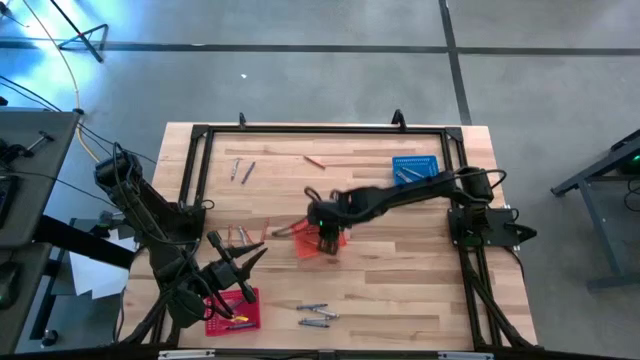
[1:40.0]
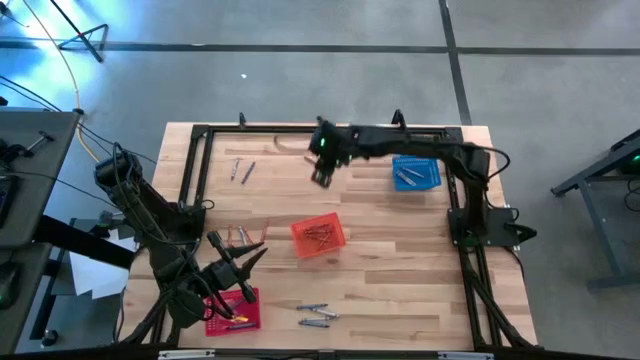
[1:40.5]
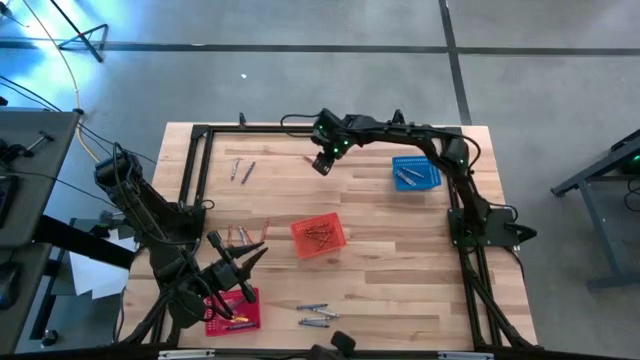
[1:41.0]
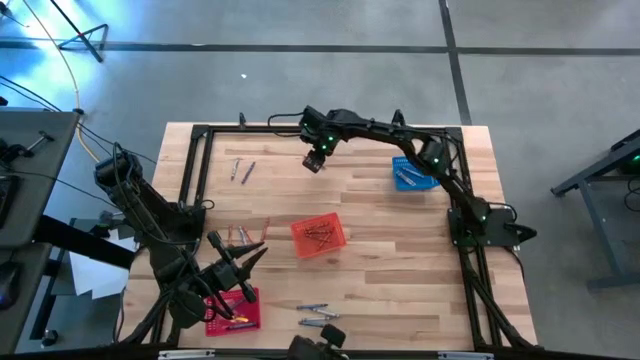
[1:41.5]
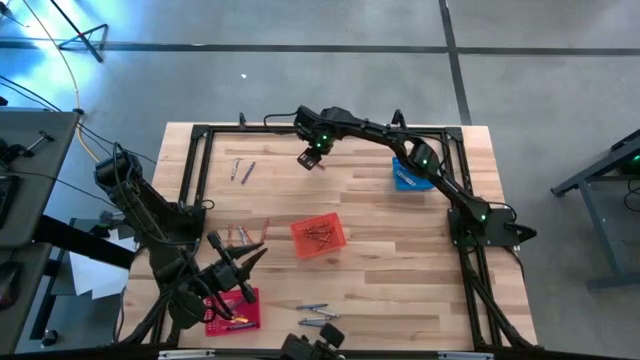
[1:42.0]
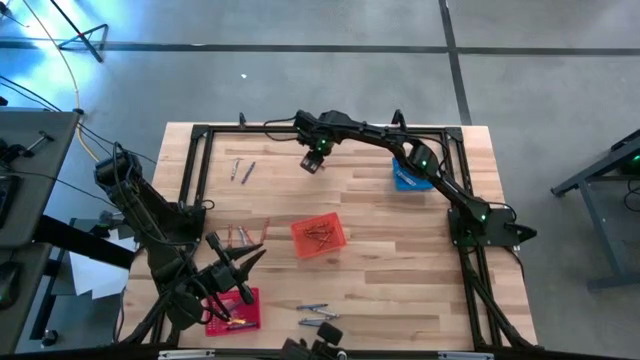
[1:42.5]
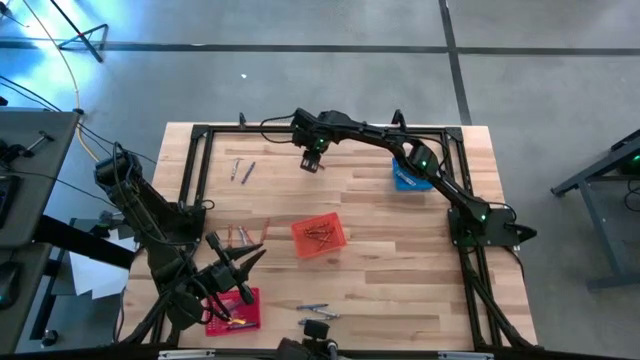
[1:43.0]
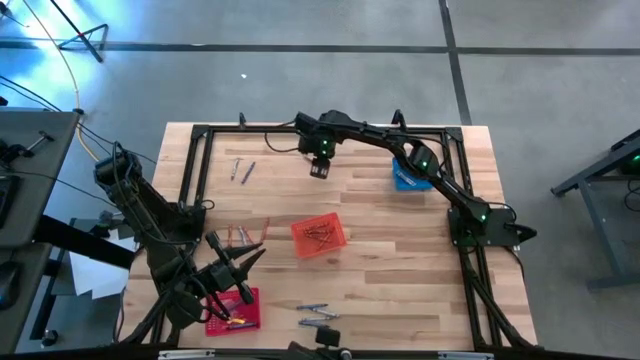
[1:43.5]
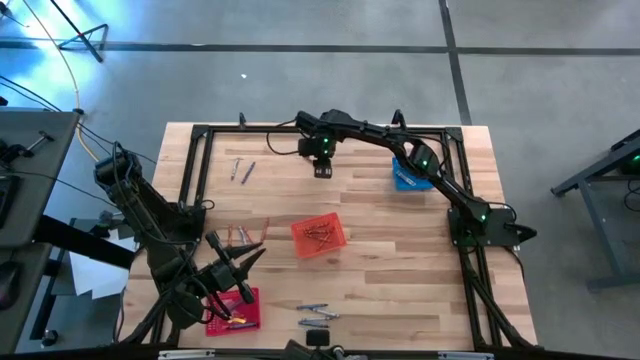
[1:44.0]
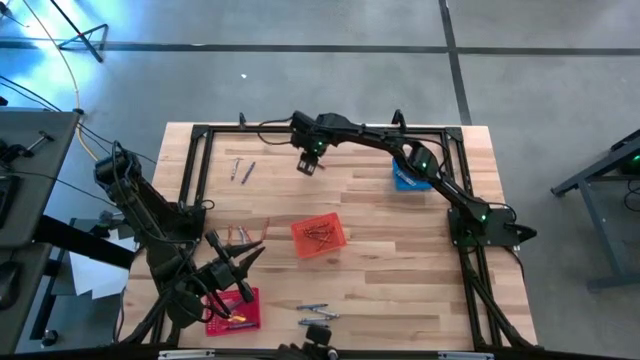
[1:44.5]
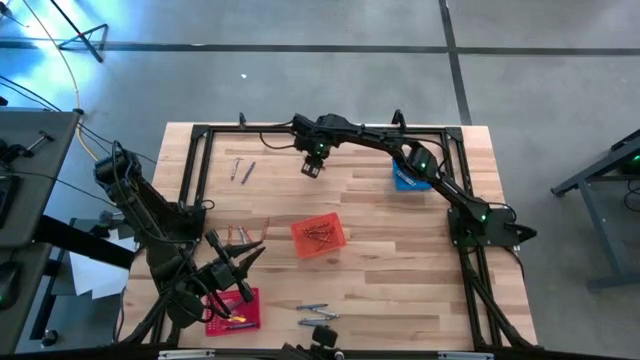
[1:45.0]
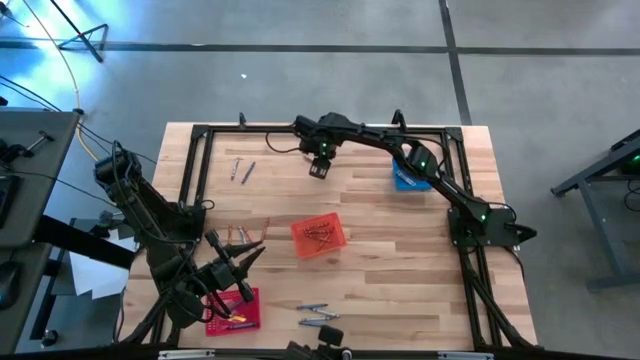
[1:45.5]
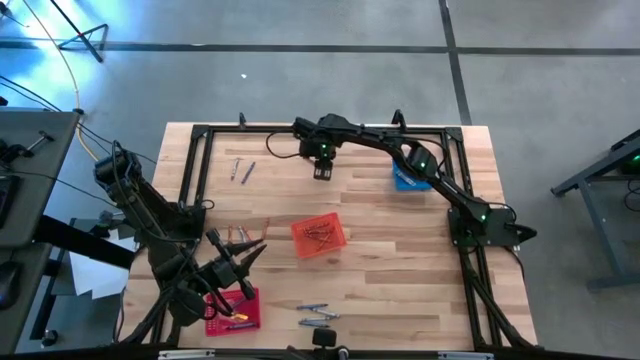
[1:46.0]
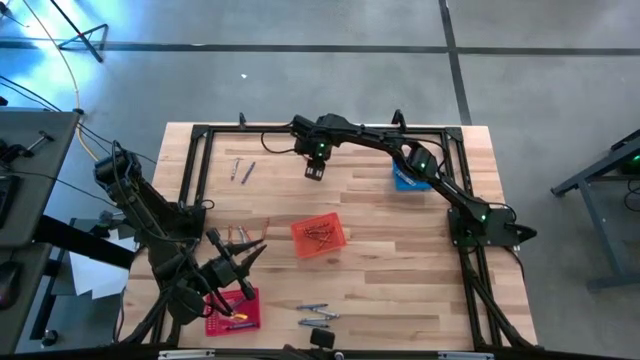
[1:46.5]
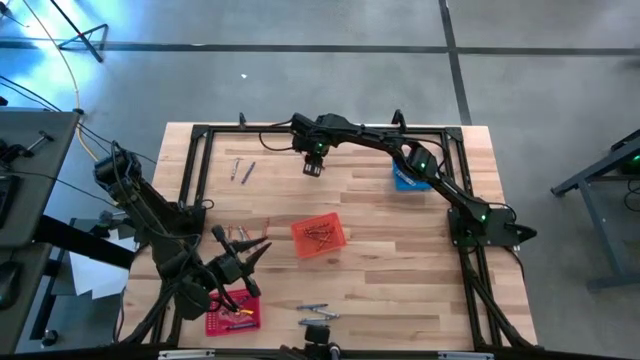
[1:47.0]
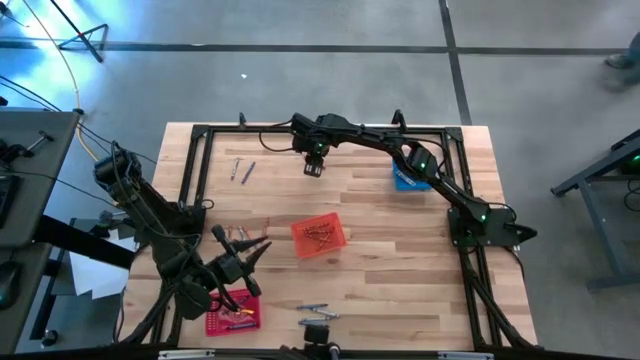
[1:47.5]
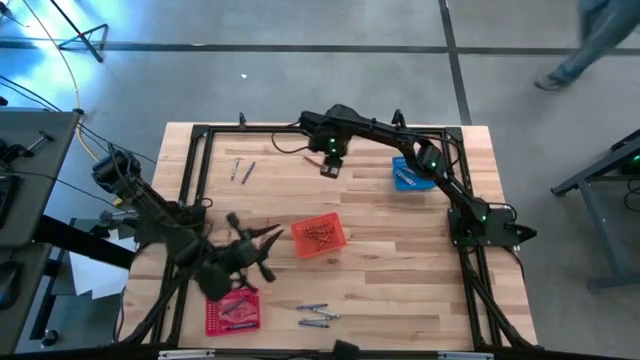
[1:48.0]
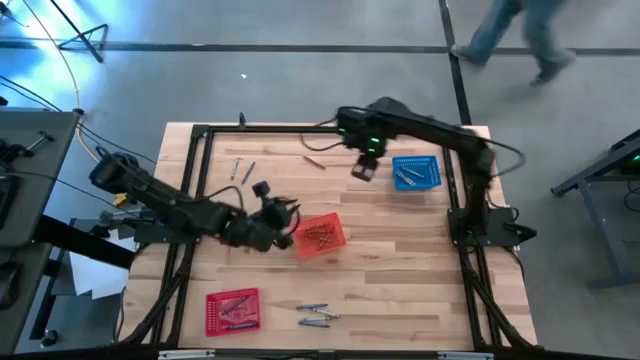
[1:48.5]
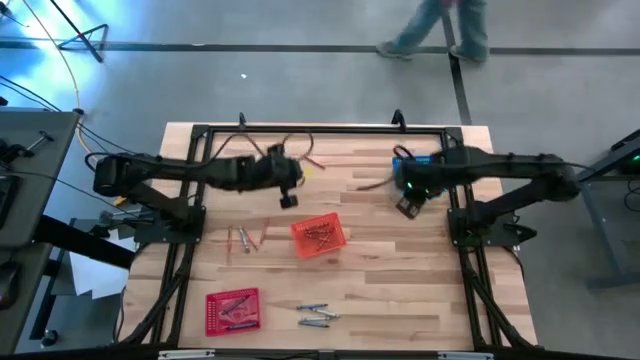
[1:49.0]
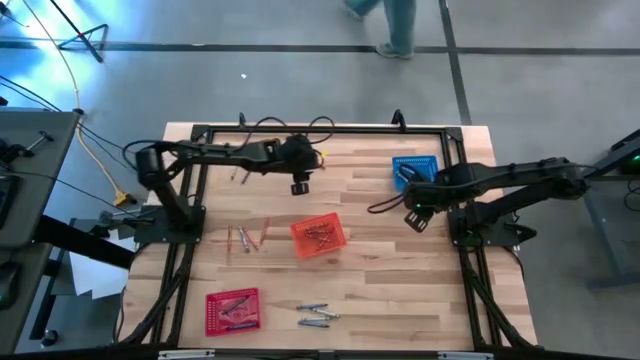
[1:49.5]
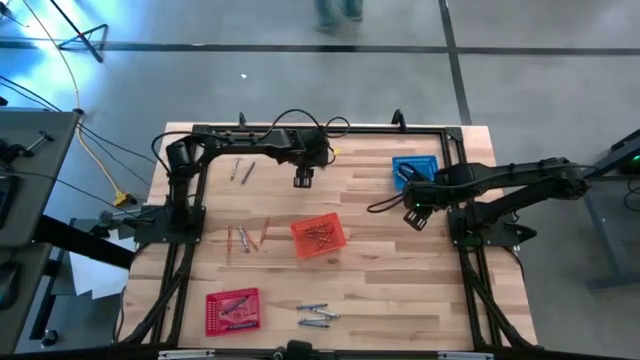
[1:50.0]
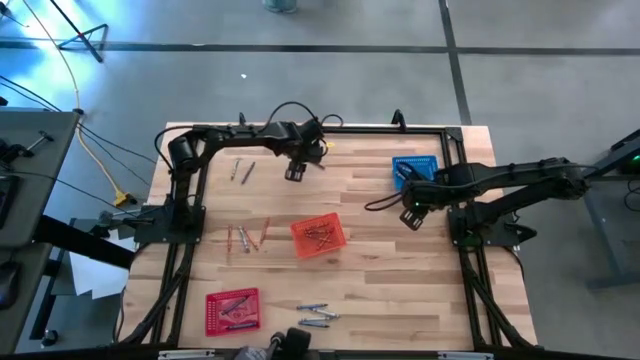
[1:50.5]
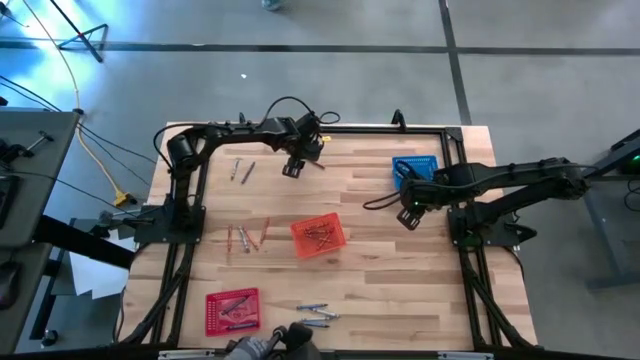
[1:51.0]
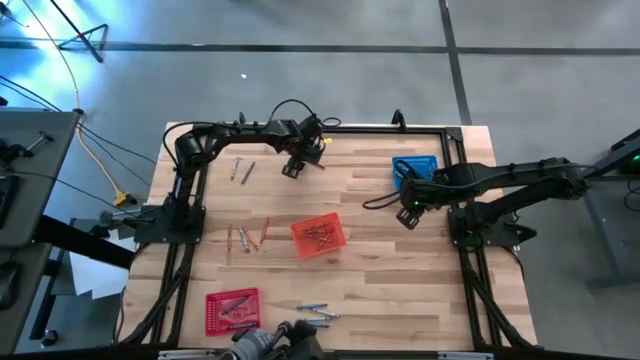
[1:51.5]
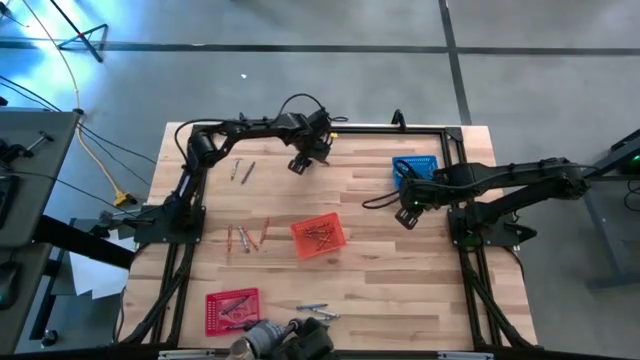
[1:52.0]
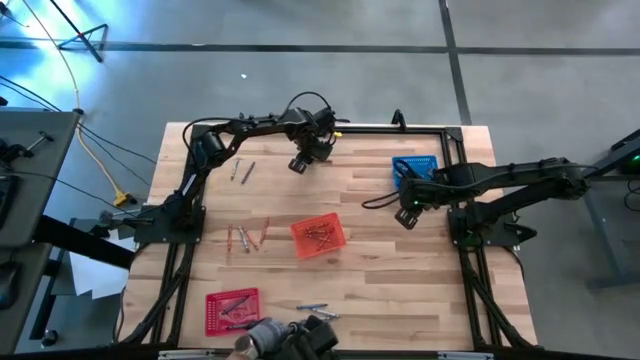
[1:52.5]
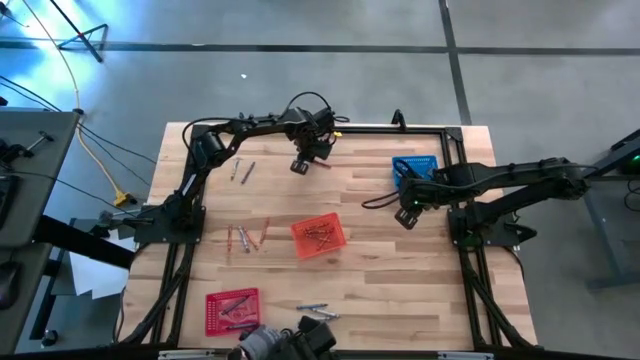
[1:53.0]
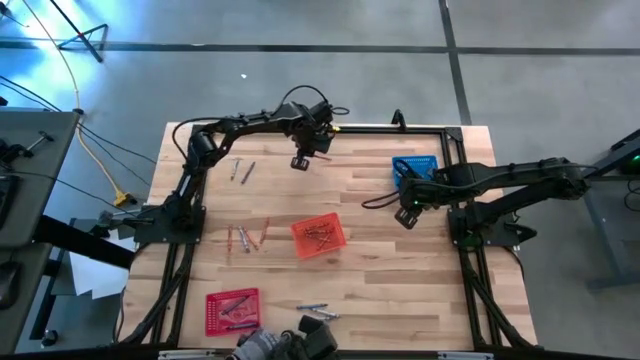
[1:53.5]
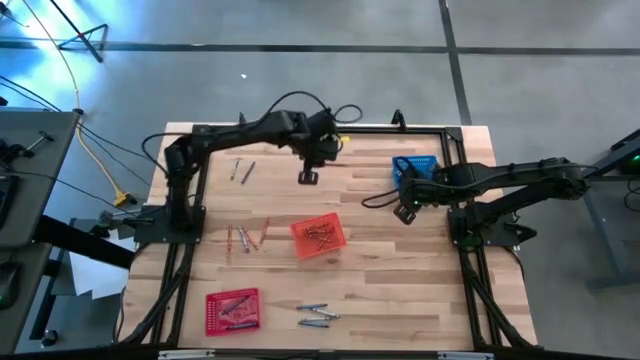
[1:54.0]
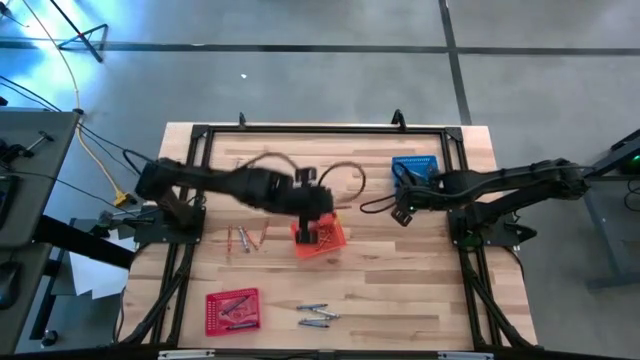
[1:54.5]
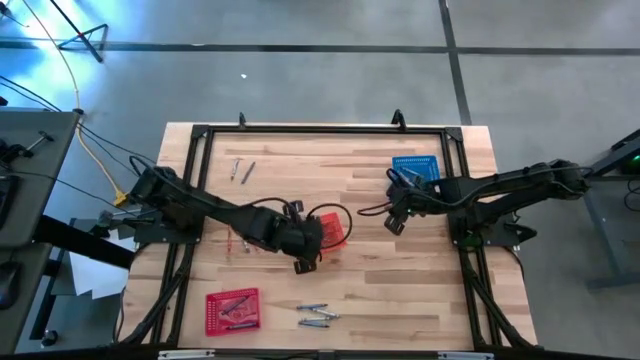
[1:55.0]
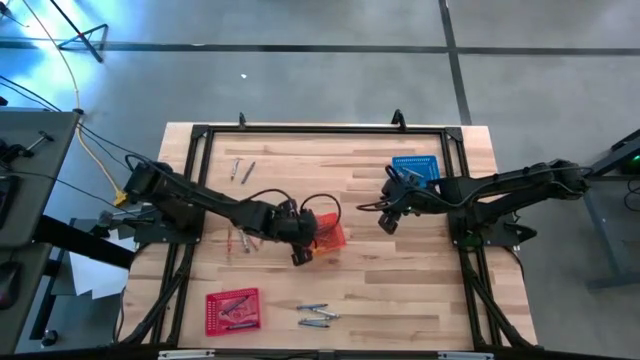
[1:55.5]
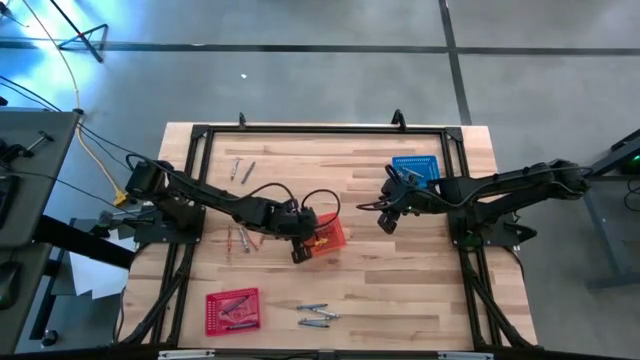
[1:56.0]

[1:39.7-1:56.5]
Task: Sort crayons
Put the orange crayon into the orange bin

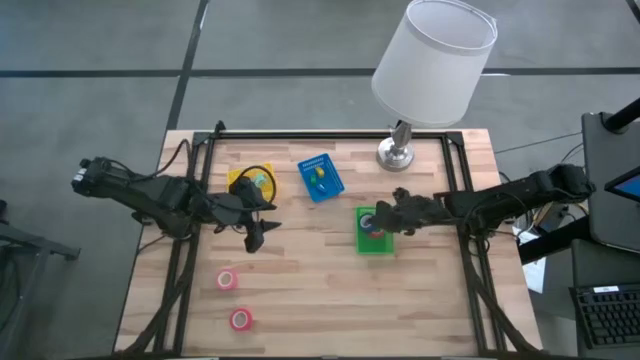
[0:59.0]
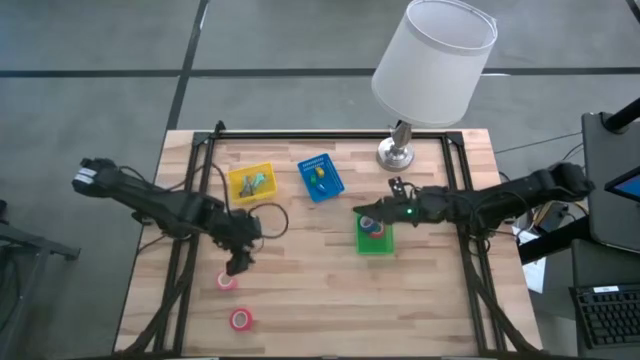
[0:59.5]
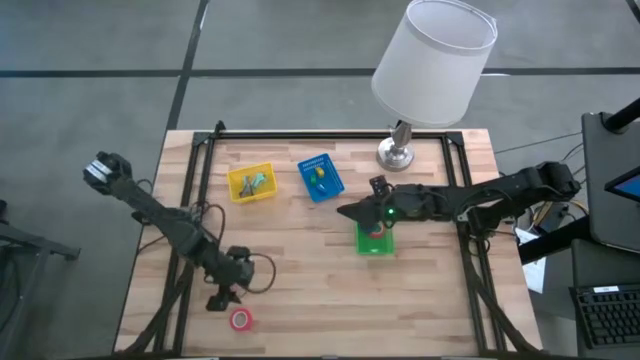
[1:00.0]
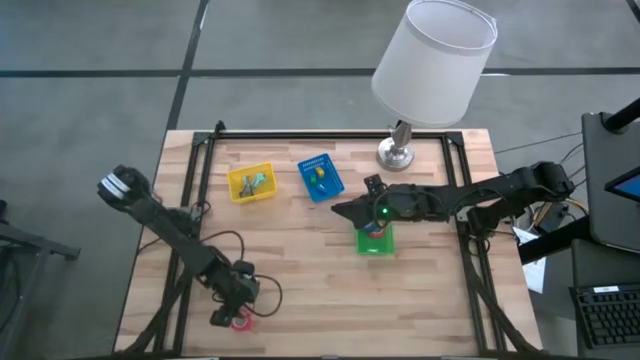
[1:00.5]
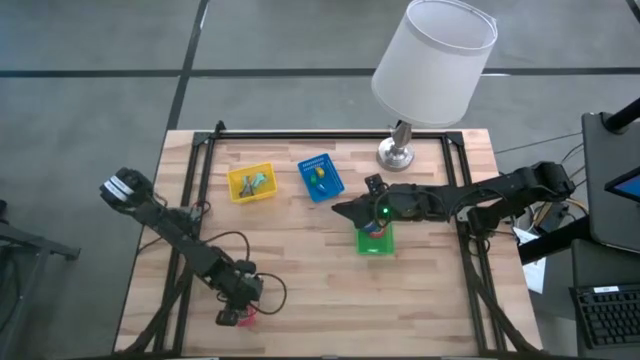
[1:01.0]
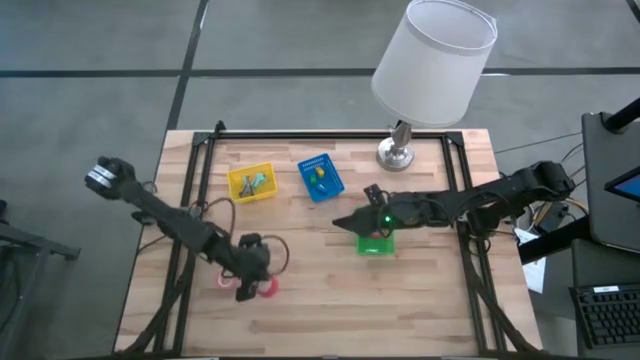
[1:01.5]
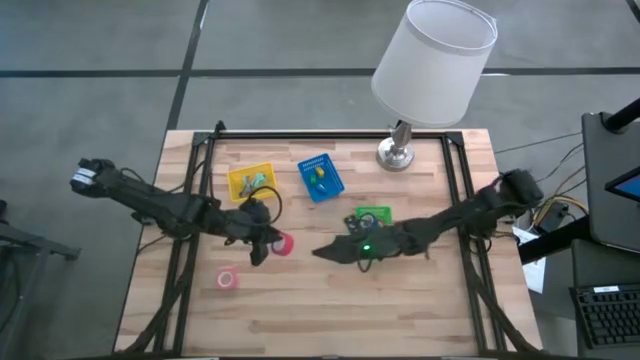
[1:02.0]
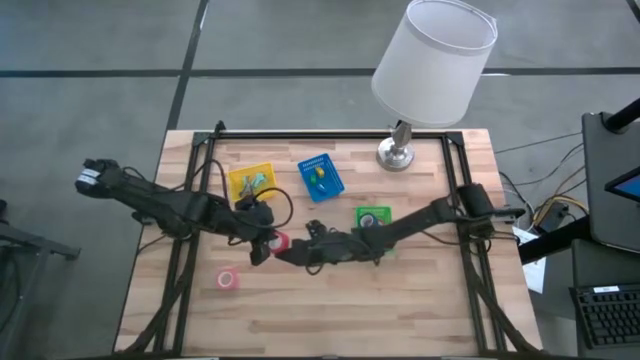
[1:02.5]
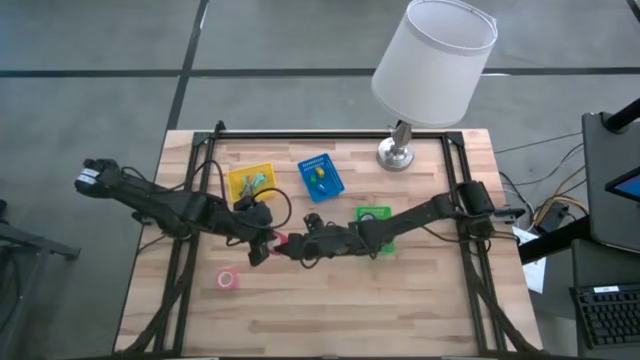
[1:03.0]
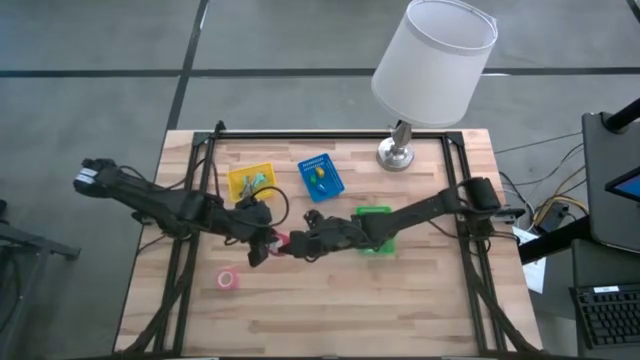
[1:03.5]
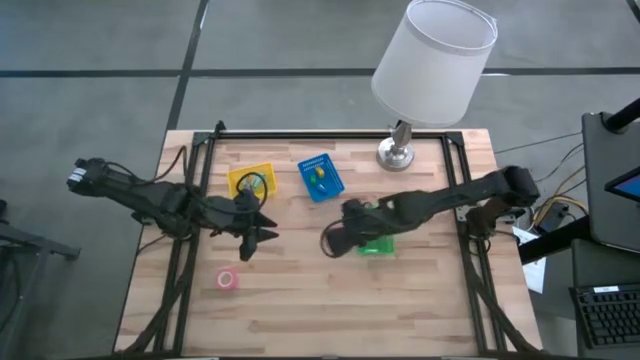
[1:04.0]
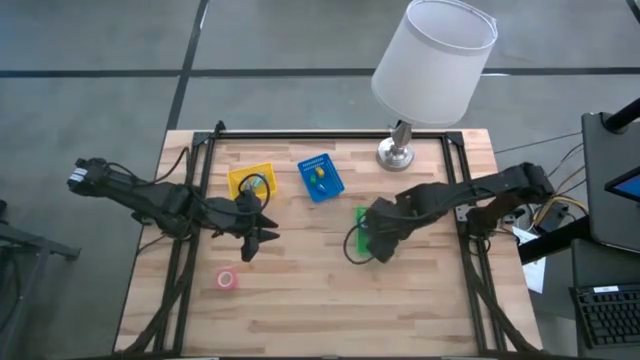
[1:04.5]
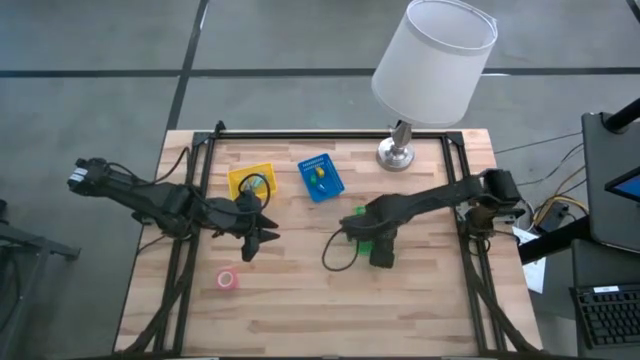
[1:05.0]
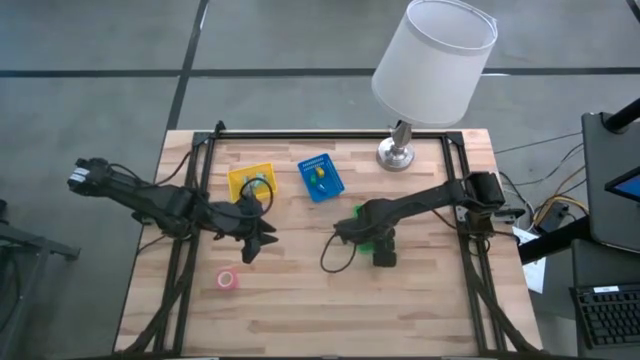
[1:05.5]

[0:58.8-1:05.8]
Task: Pick and place Stapler, Stapler remover, tape
Put the orange tape into the green bin
